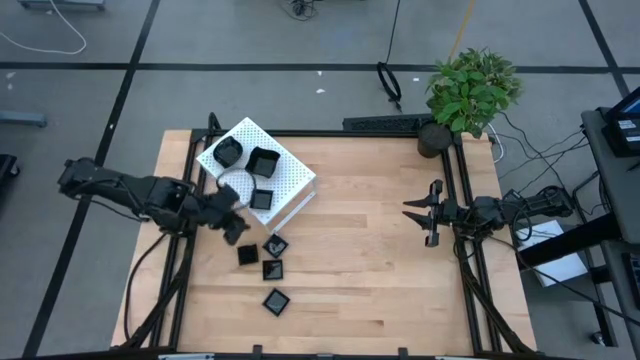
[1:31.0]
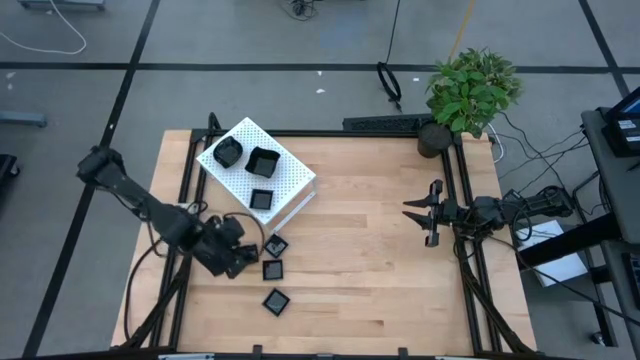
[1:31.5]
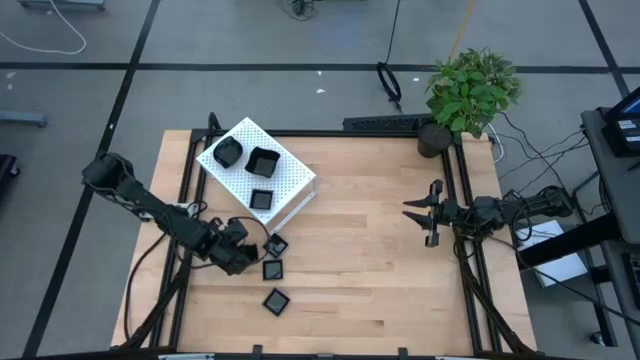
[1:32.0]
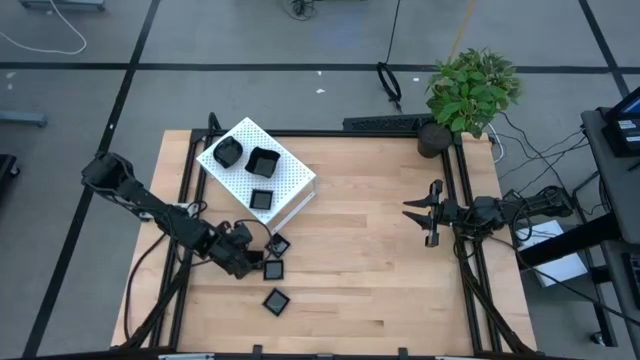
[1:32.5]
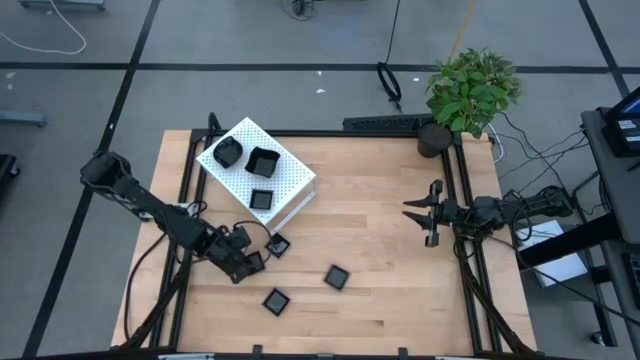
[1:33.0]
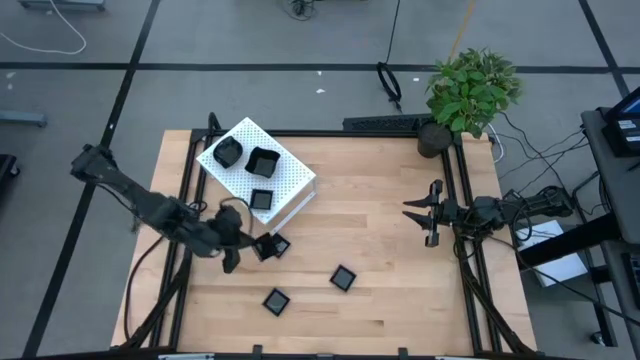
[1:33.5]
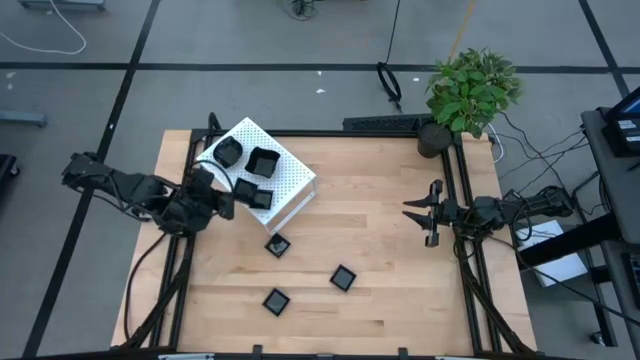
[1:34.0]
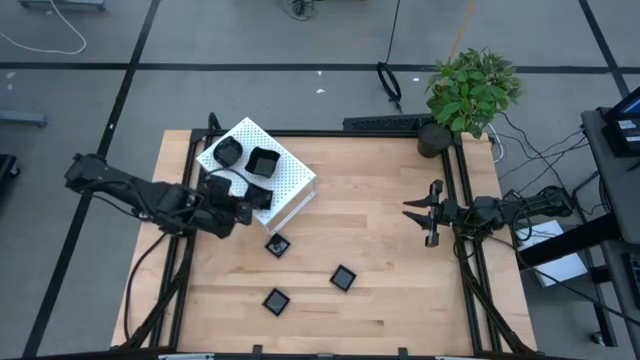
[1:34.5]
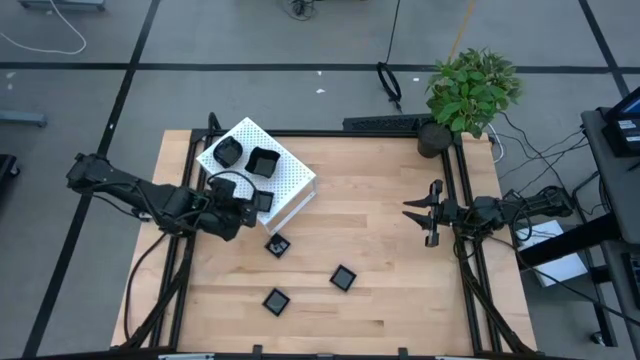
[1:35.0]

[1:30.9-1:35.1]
Task: Pick & Place Mini shaped plates
Stack the black square plate on top of the black square plate on the shelf

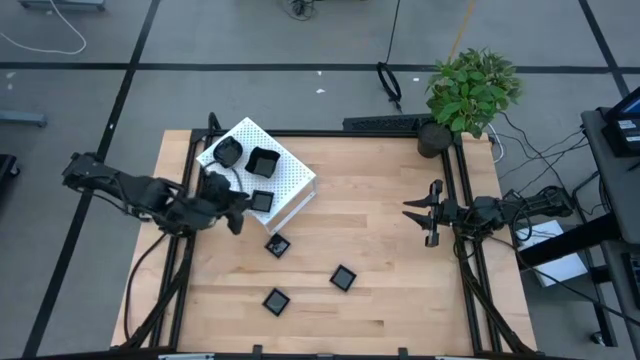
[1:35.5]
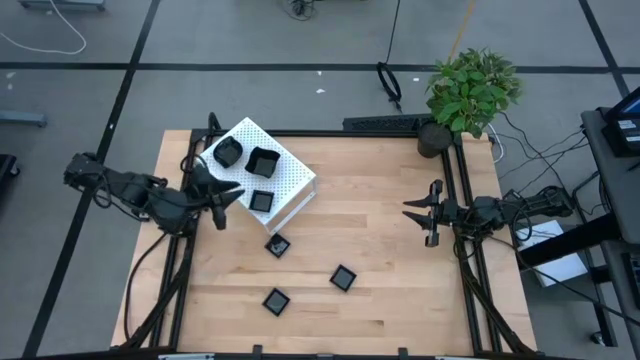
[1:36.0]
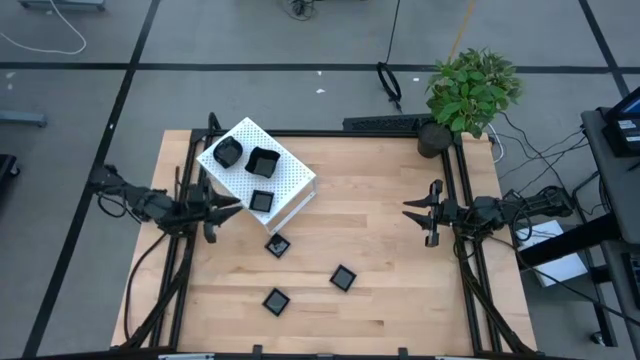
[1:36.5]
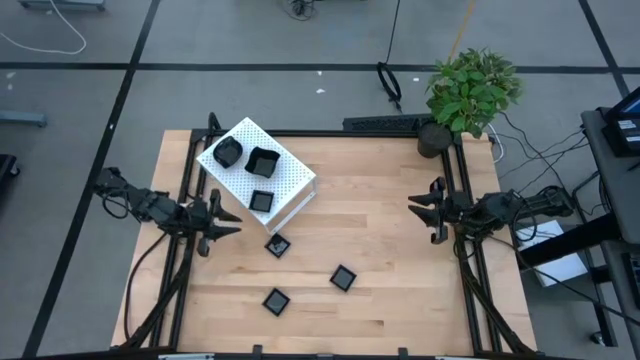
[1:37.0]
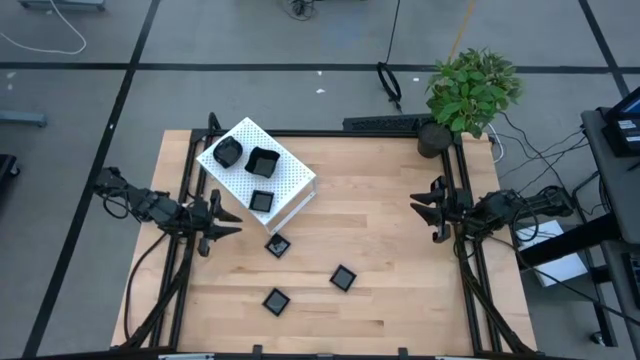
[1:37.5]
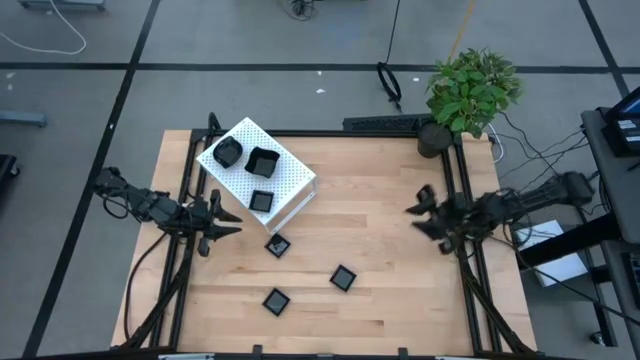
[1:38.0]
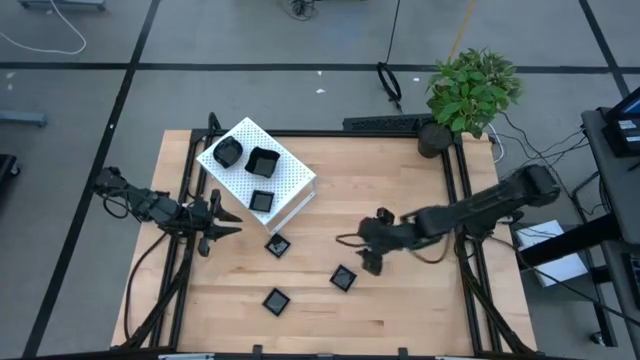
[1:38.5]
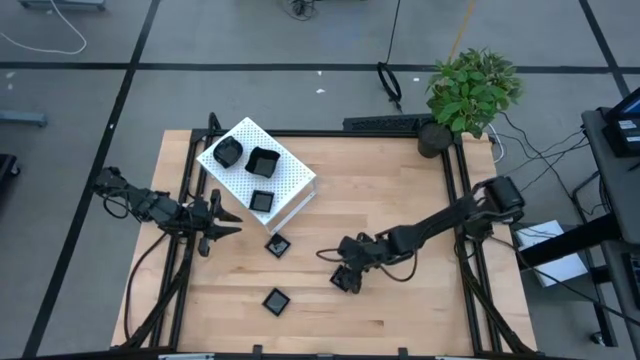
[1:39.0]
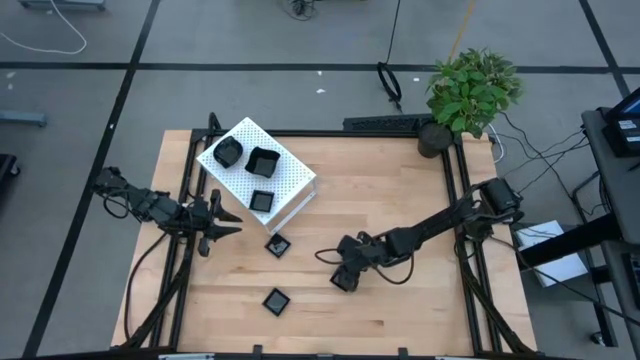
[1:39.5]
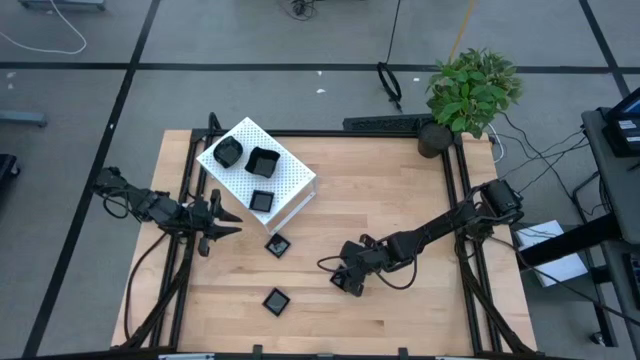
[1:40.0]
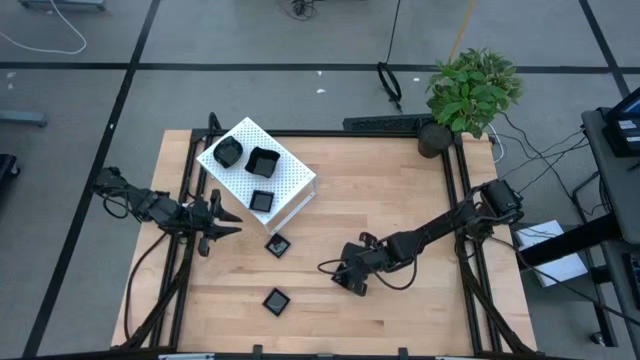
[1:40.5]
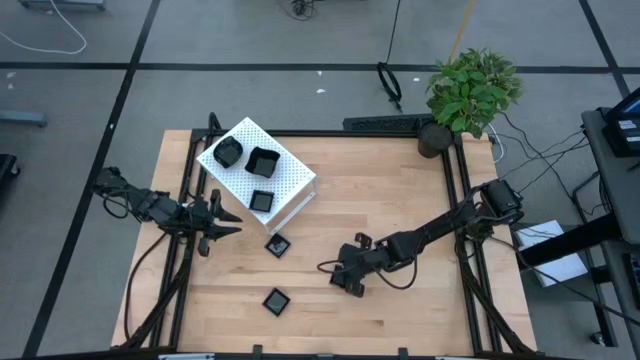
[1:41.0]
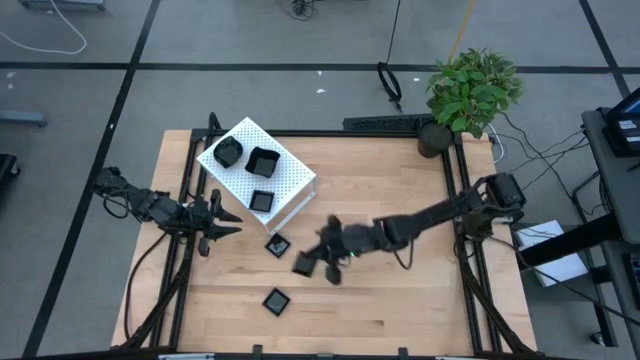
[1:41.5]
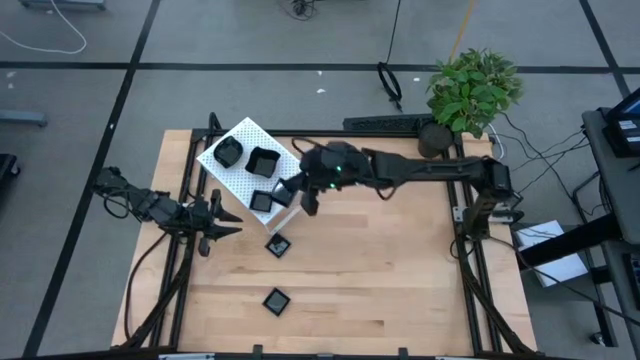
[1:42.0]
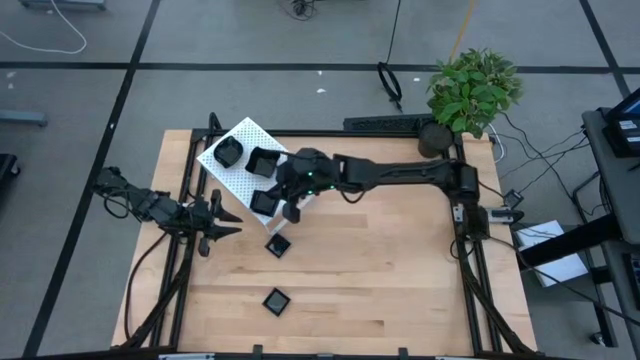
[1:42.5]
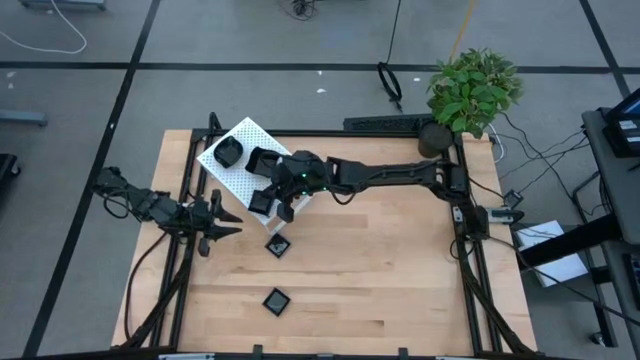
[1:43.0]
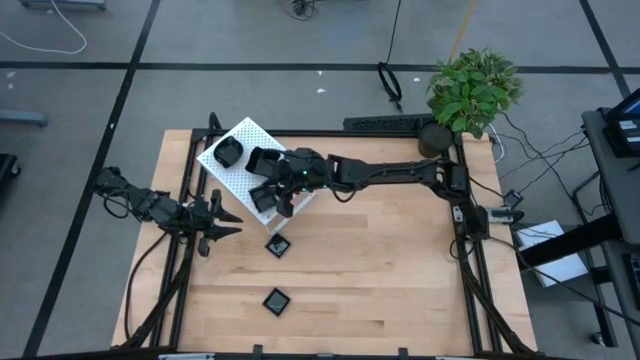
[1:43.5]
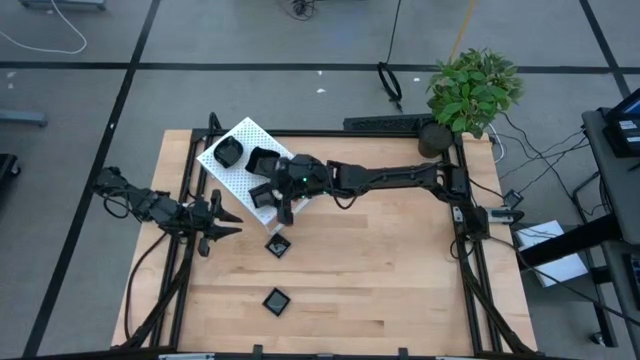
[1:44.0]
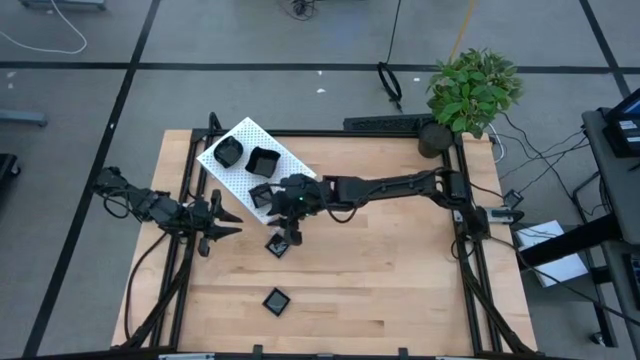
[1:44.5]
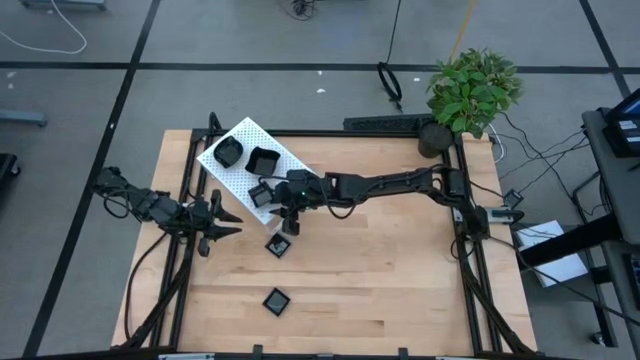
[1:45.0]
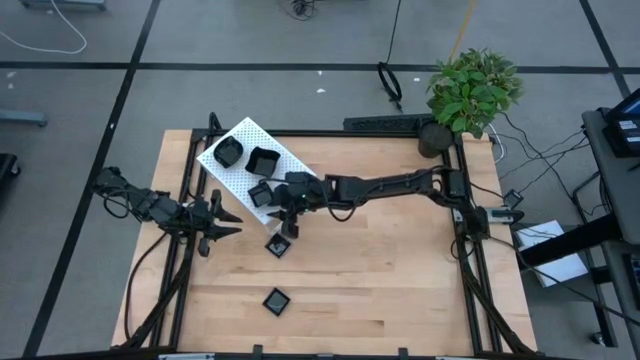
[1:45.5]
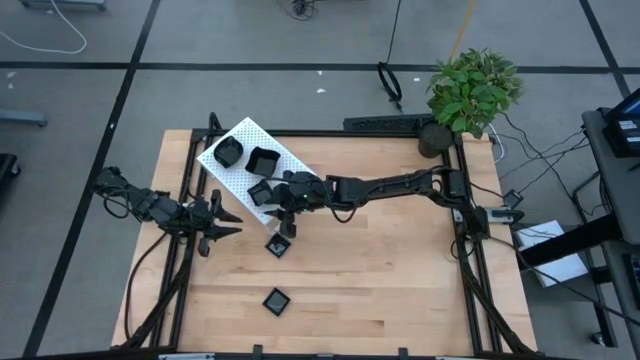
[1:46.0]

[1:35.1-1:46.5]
Stack the black square plate on top of the black square plate on the shelf

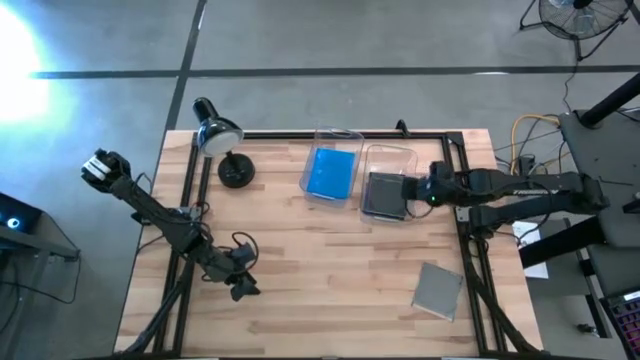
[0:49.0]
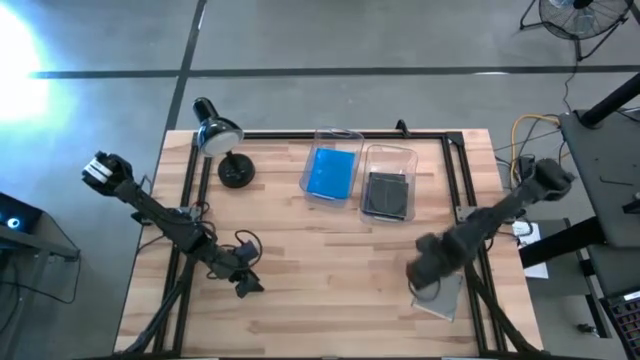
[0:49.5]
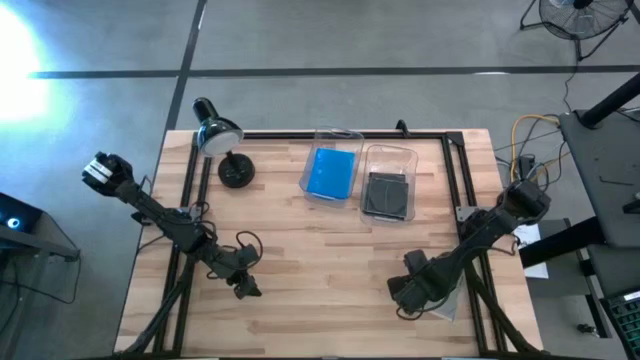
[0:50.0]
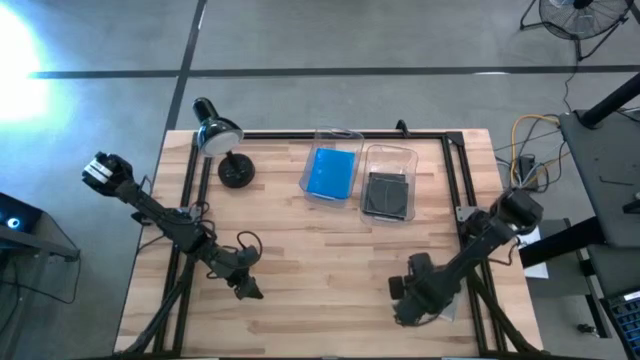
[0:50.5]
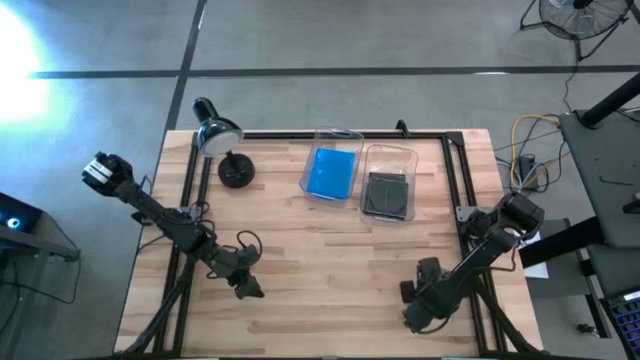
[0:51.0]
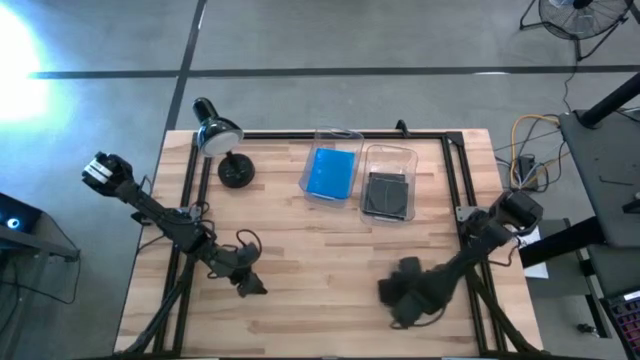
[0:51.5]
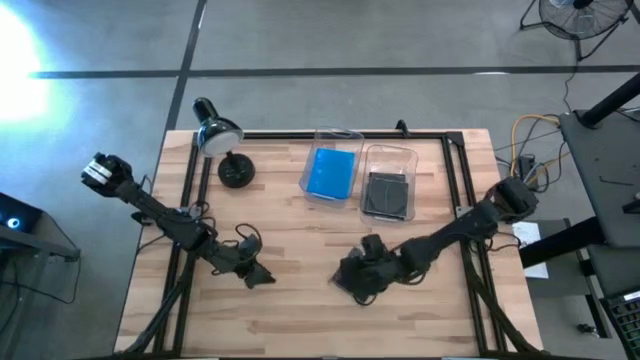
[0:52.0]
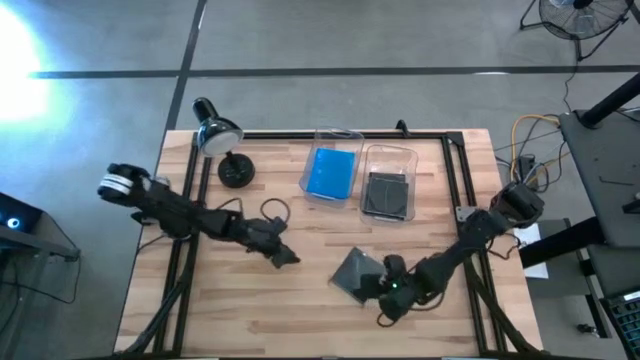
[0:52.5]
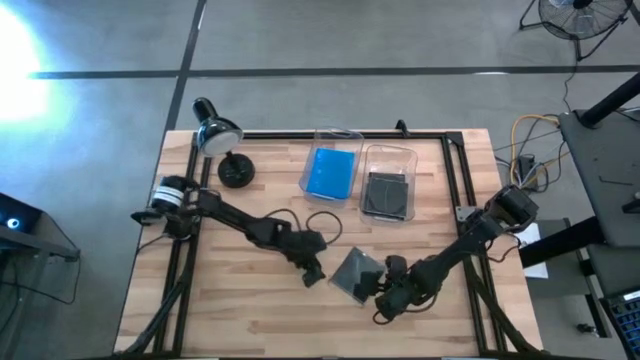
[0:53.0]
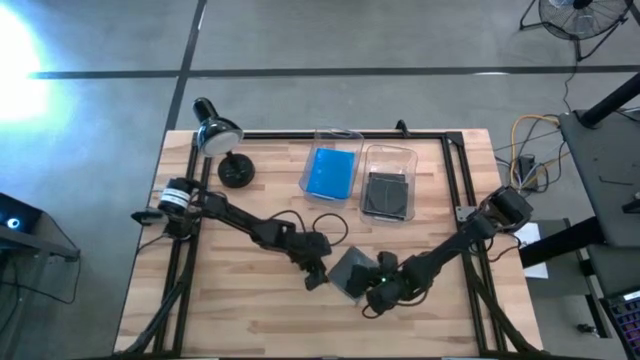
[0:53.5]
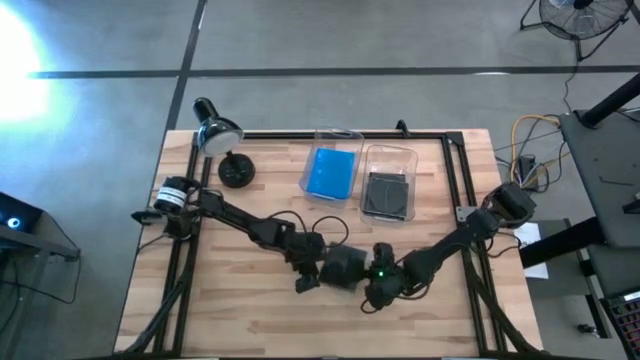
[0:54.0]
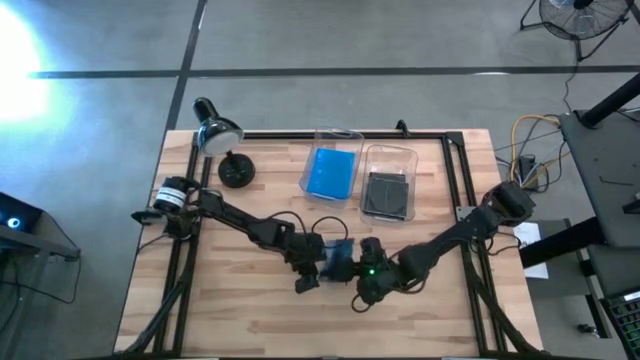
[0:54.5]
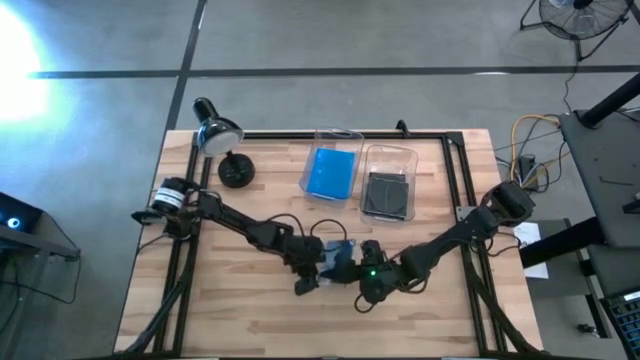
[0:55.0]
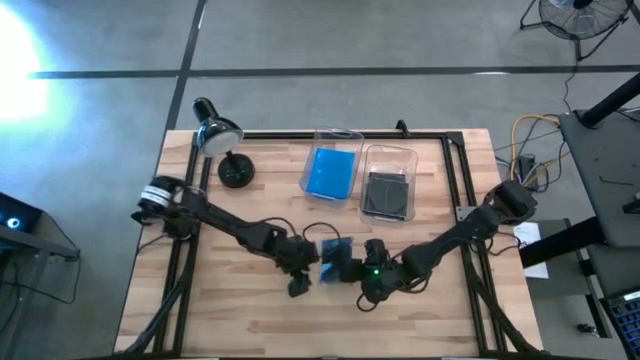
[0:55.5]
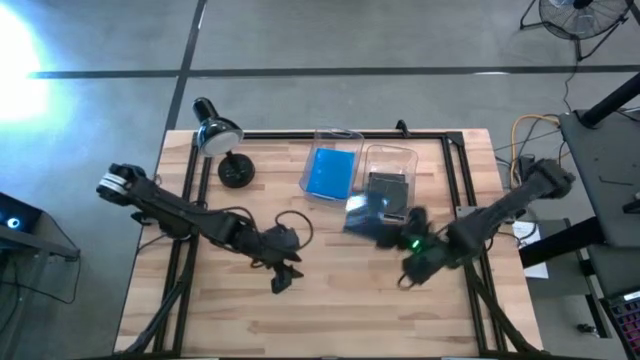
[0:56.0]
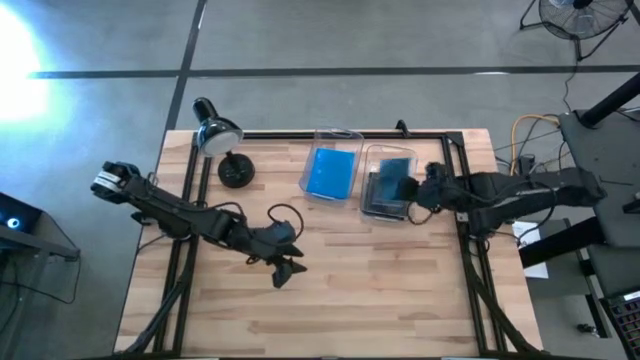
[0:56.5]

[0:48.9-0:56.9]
Task: Pick & place jewel cases by type
Put the black CD case into the right transparent bin
